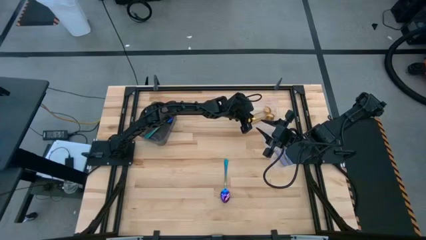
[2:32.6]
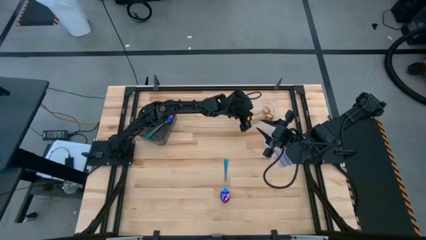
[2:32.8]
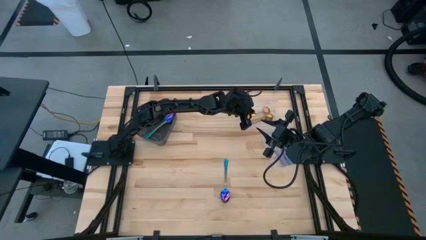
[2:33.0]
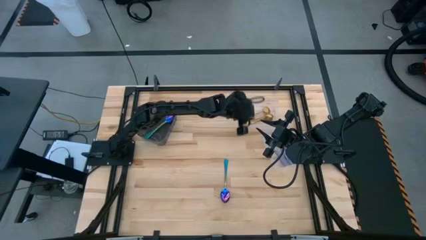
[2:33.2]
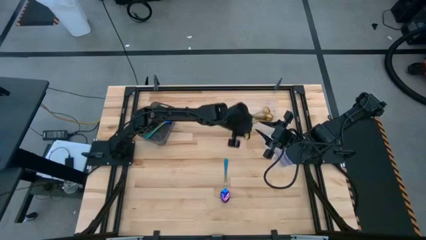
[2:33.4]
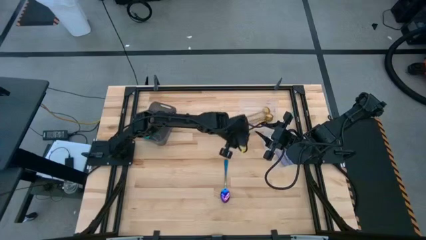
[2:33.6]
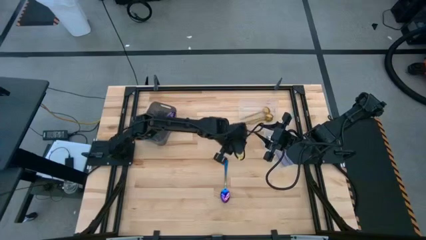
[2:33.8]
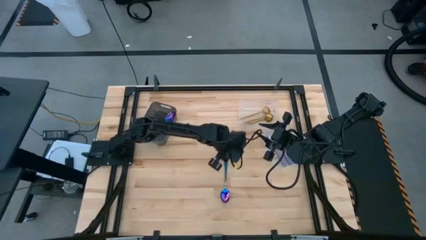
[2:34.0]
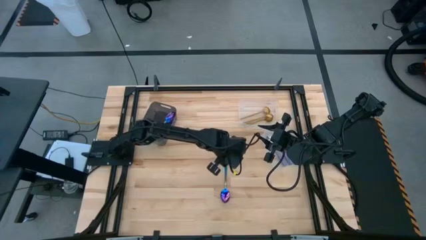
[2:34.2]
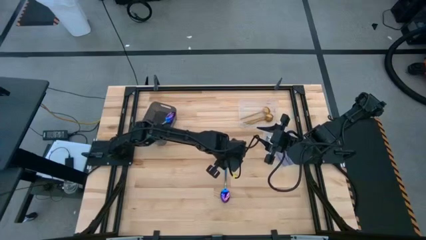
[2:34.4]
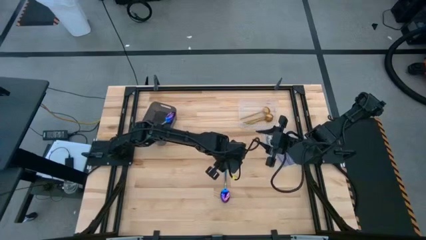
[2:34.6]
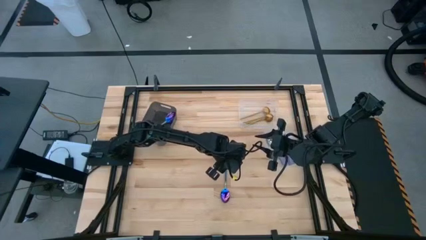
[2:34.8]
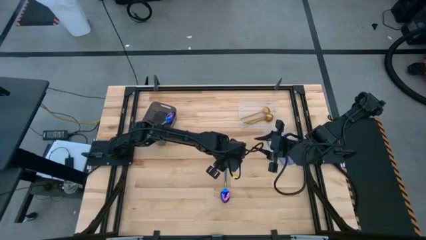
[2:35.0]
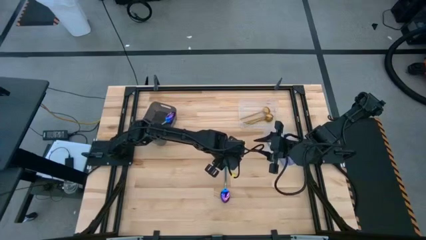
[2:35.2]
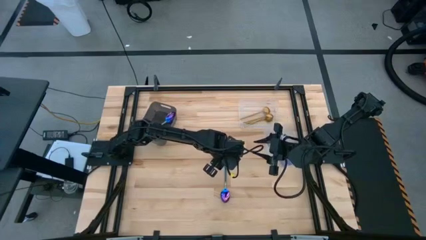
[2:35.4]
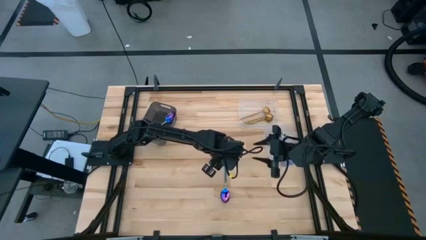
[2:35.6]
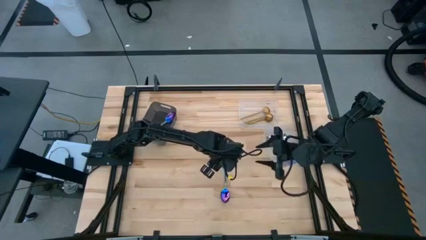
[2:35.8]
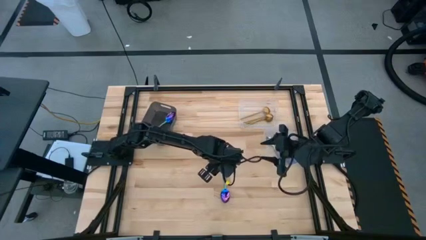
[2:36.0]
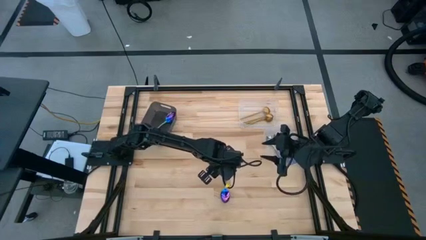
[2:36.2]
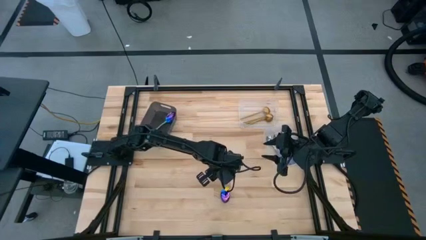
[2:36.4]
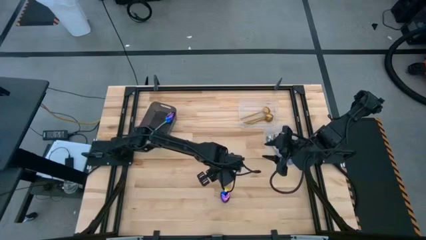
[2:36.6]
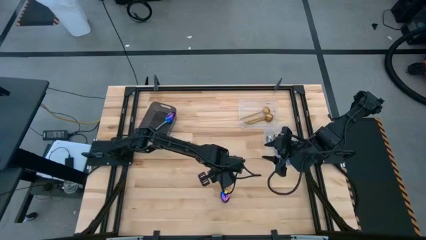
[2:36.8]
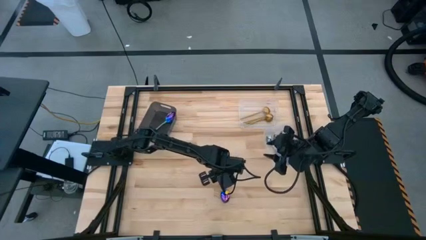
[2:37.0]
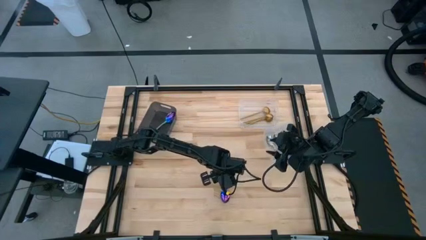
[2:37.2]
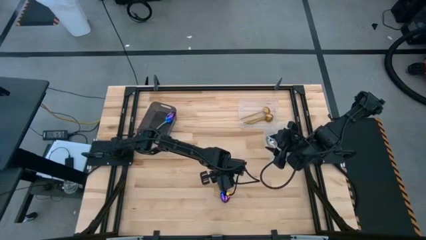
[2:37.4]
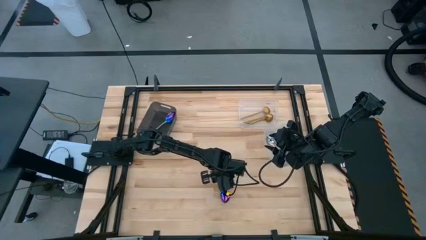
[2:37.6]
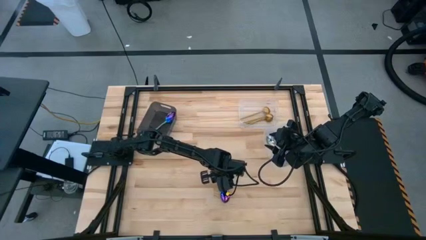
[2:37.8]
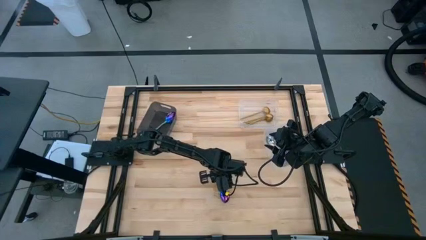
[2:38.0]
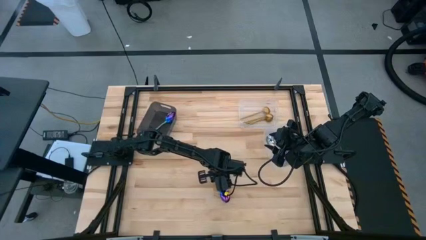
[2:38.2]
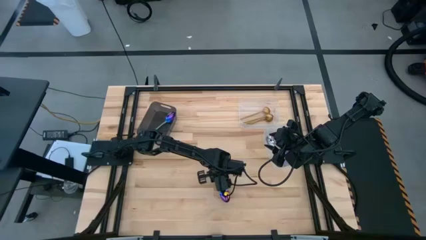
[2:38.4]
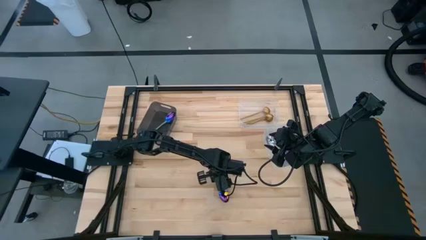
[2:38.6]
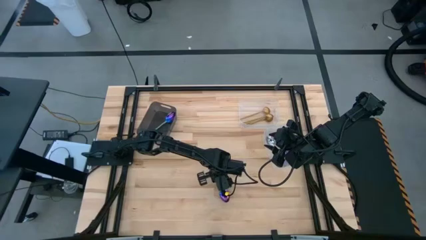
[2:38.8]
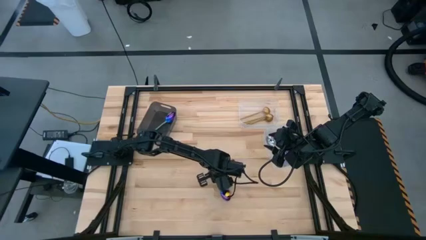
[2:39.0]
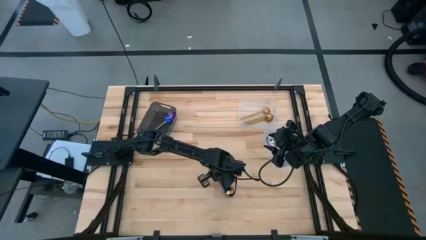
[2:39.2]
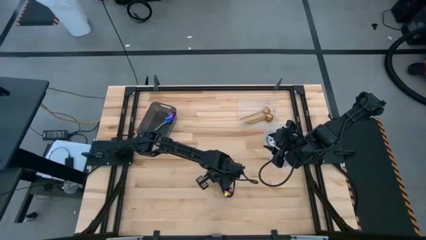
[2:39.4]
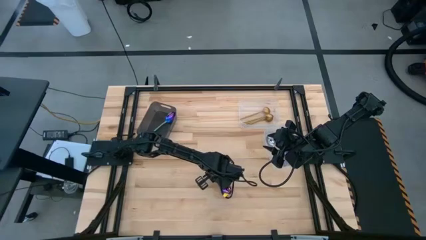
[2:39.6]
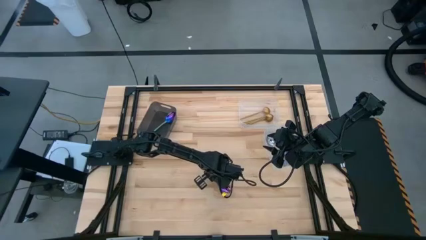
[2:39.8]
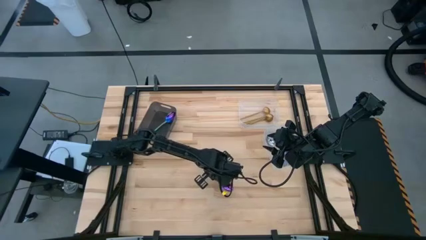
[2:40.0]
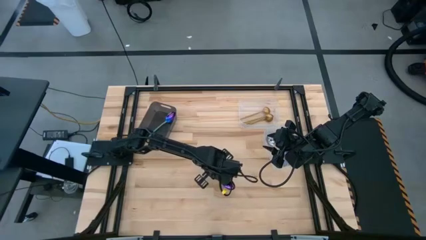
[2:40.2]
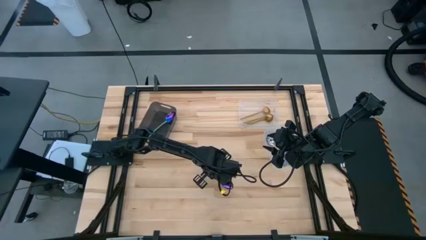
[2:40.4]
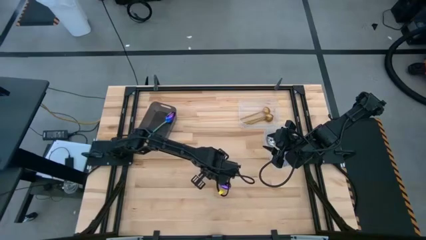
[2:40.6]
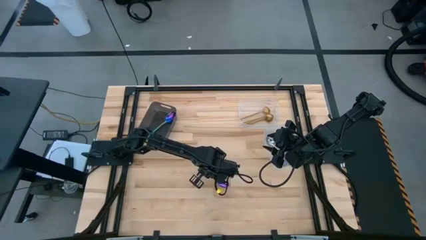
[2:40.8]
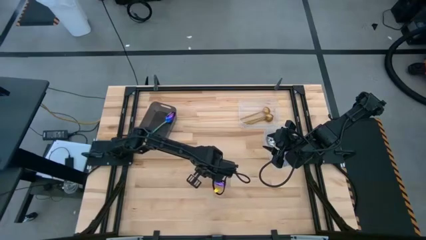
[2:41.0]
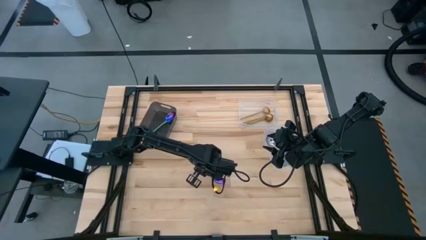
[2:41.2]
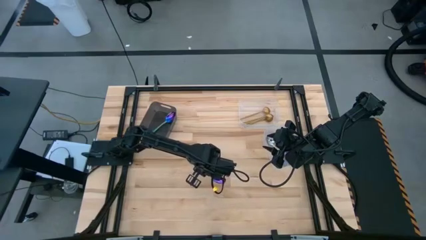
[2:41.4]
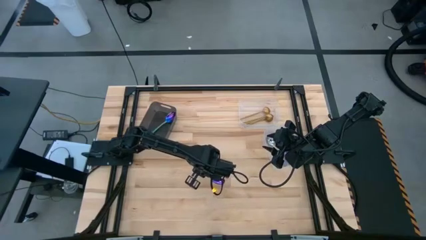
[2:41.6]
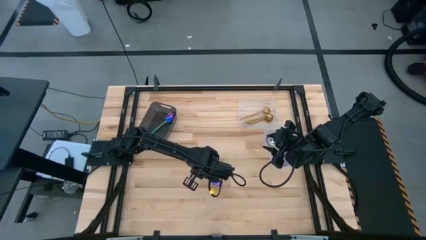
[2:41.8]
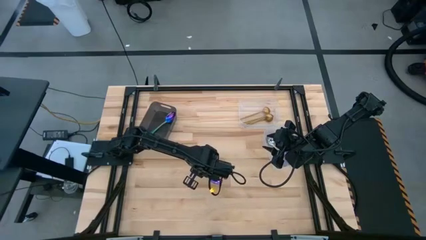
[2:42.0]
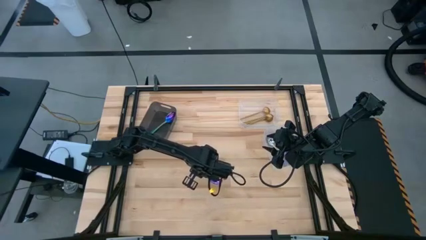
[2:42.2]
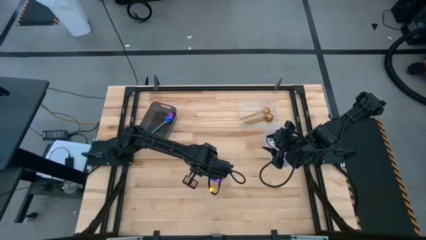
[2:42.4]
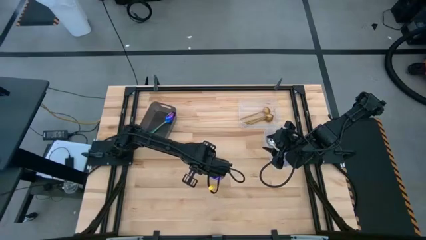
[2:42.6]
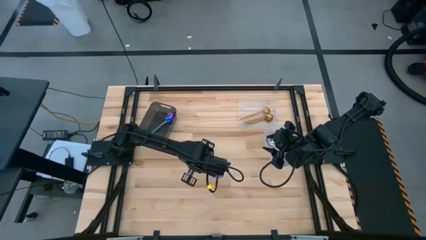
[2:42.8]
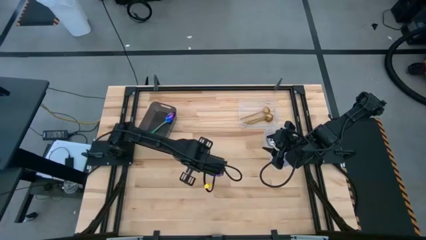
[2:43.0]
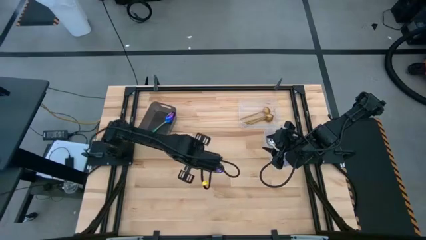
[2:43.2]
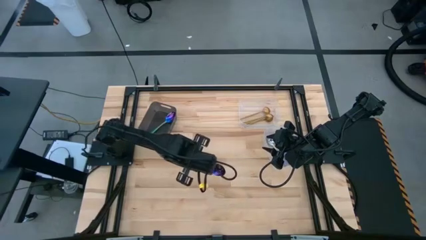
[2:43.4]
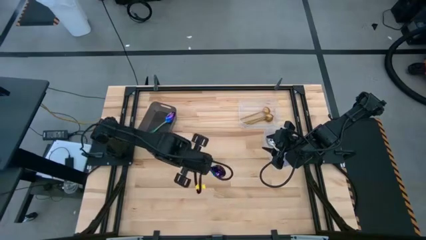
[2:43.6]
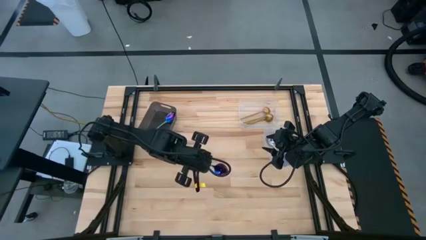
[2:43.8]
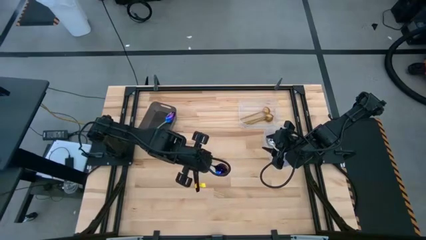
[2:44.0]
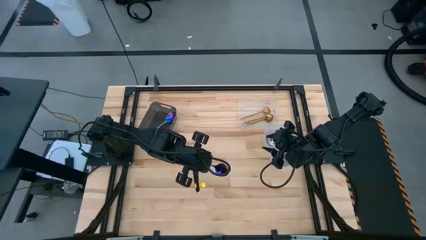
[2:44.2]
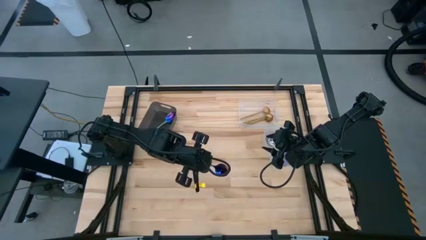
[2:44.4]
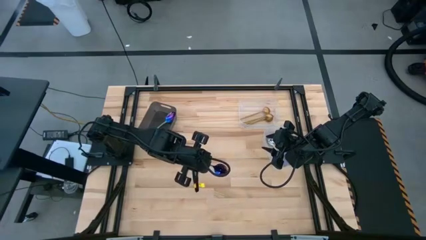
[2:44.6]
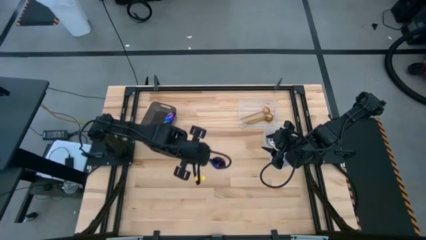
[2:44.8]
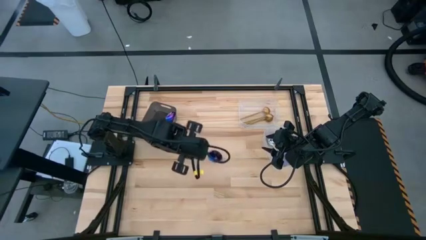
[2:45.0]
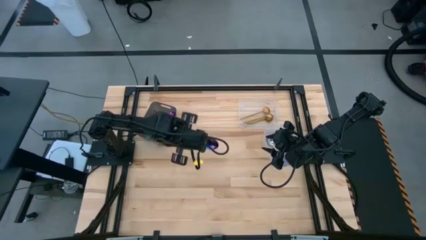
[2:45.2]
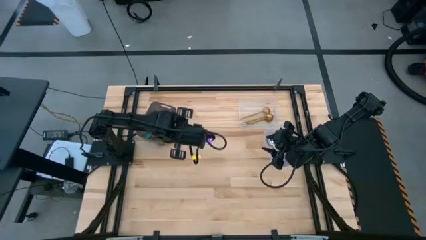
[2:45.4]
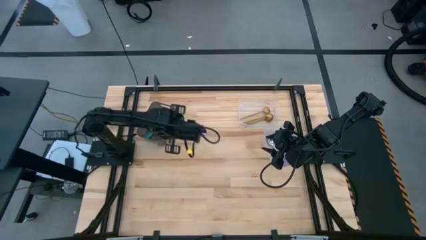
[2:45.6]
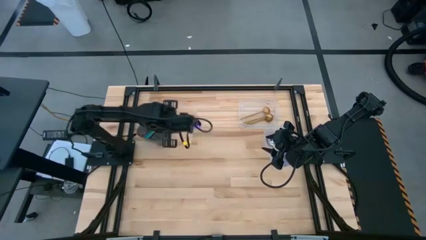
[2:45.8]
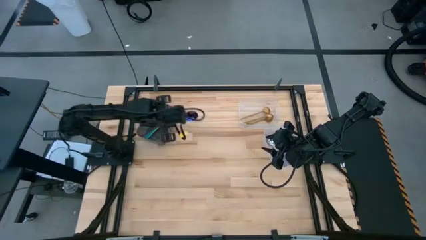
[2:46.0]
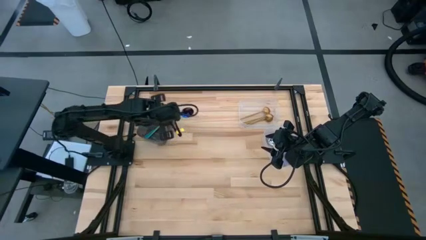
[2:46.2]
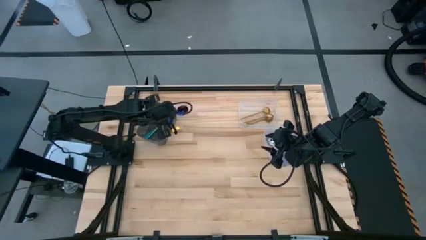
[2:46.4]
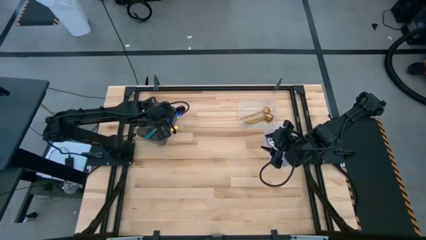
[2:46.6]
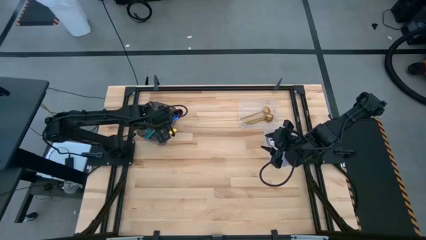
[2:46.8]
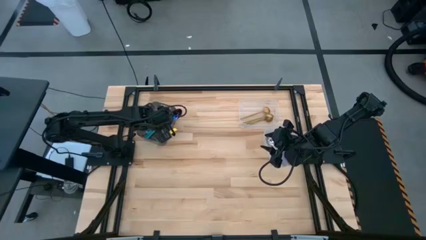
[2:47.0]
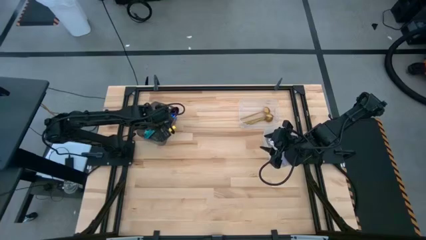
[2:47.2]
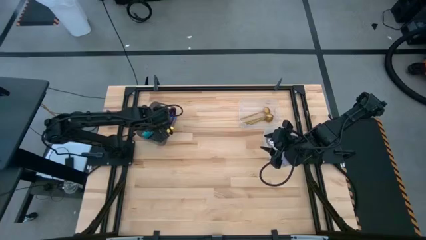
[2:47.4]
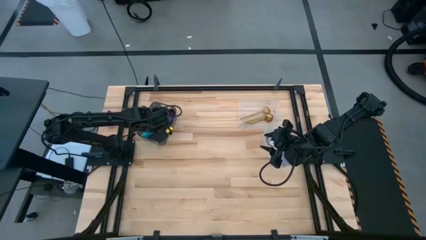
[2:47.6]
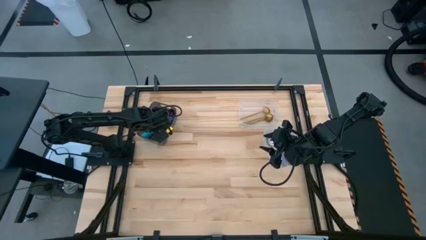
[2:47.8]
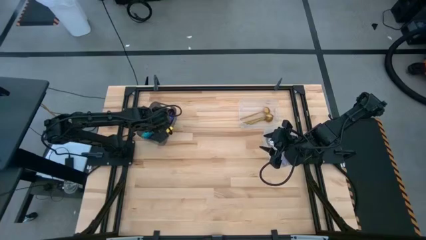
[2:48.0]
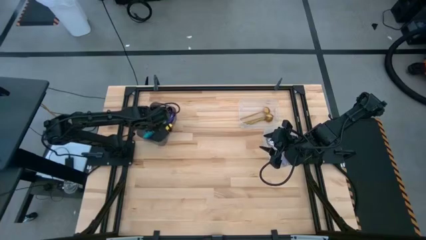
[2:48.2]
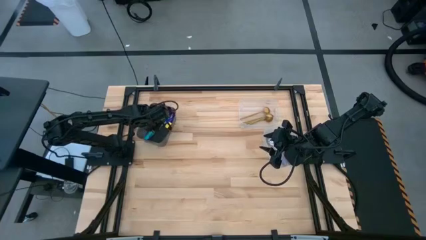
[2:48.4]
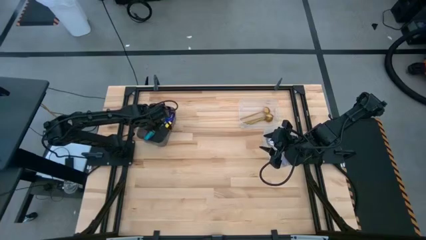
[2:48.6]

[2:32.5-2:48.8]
Task: Sort silverware by color (type)
Put the blue spoon into the black bin
